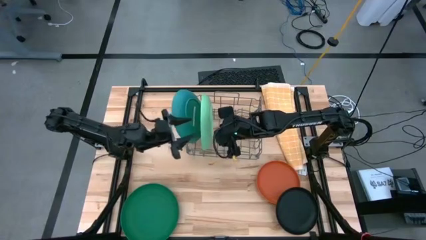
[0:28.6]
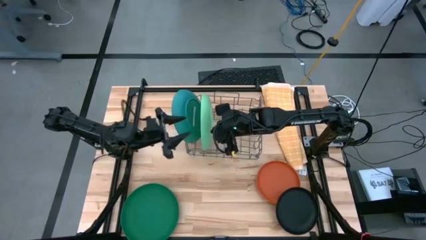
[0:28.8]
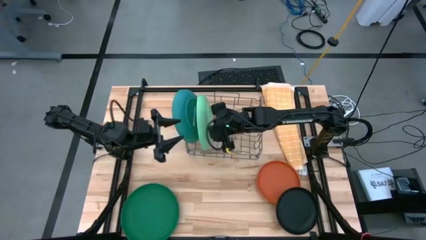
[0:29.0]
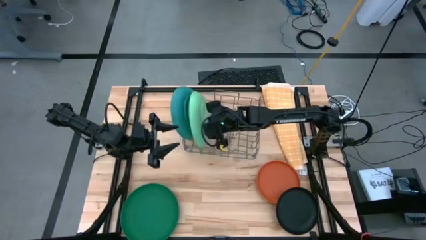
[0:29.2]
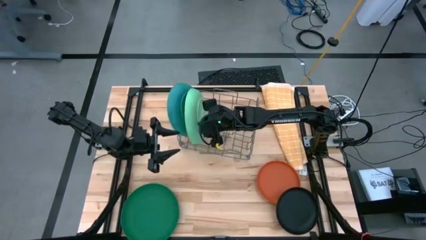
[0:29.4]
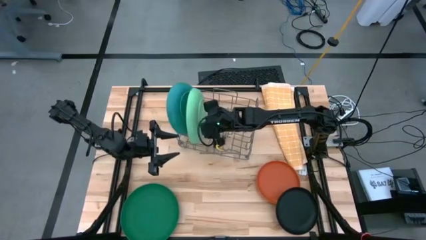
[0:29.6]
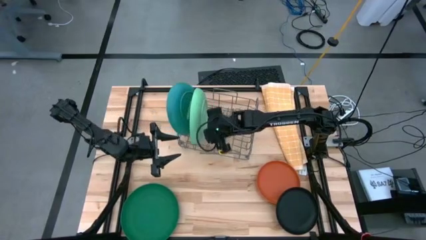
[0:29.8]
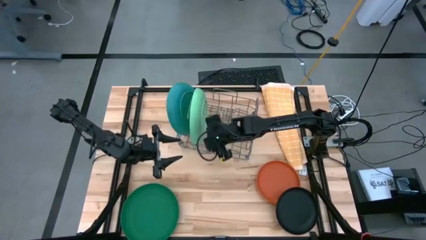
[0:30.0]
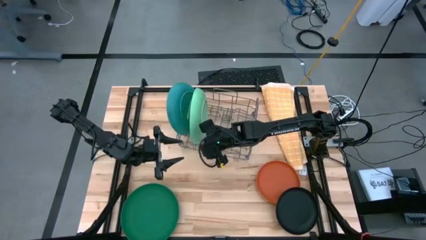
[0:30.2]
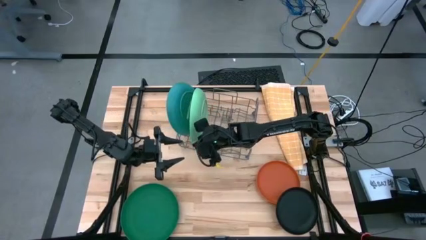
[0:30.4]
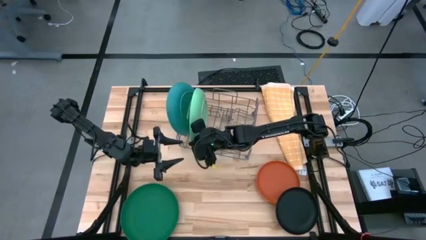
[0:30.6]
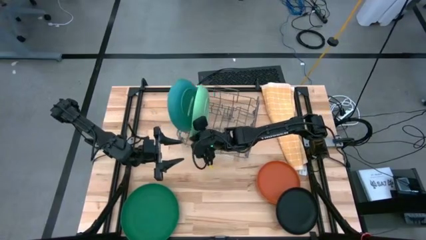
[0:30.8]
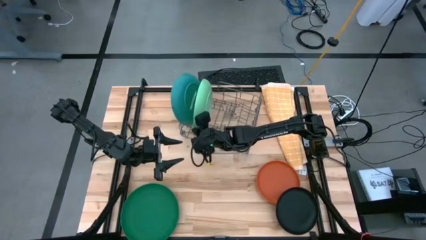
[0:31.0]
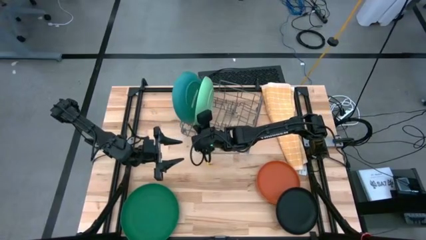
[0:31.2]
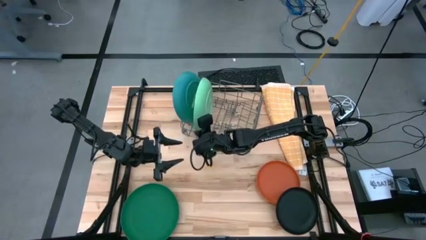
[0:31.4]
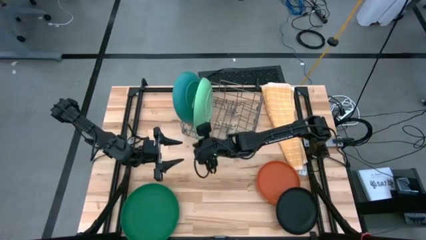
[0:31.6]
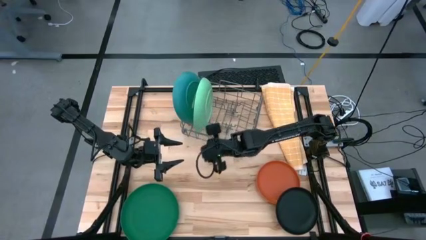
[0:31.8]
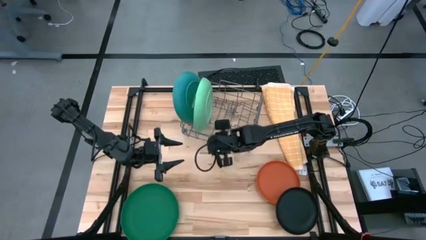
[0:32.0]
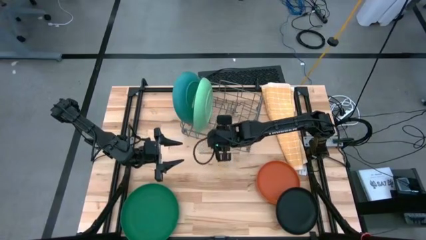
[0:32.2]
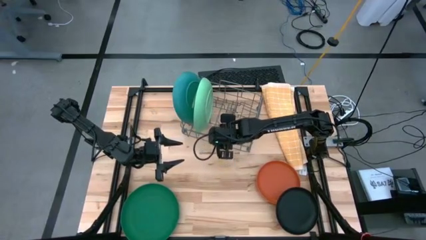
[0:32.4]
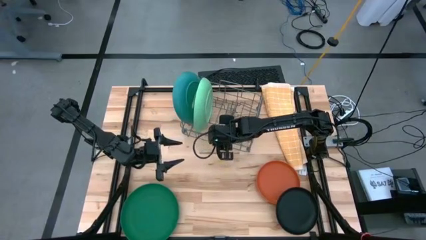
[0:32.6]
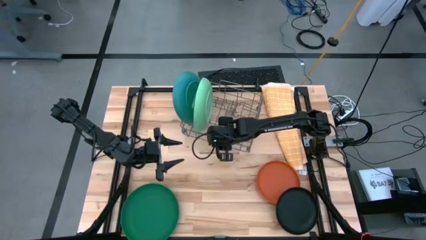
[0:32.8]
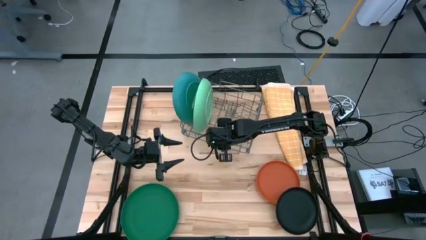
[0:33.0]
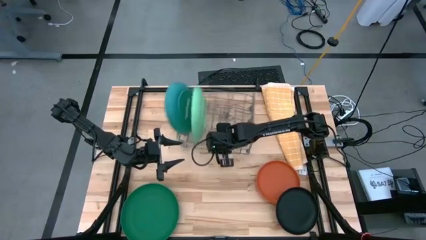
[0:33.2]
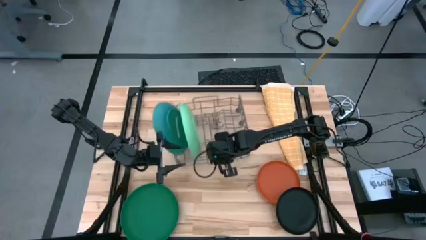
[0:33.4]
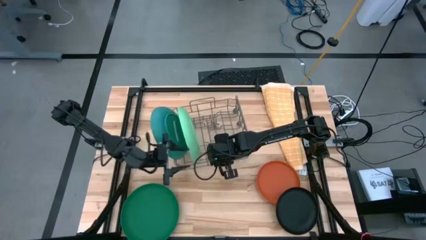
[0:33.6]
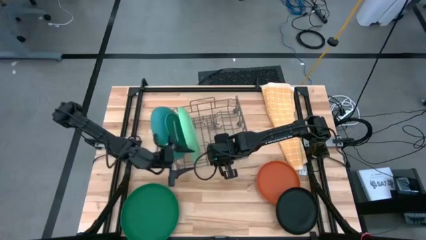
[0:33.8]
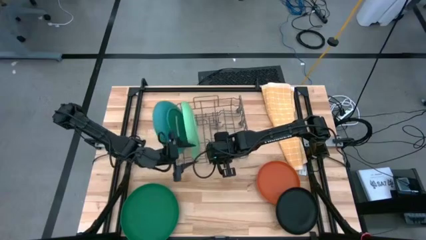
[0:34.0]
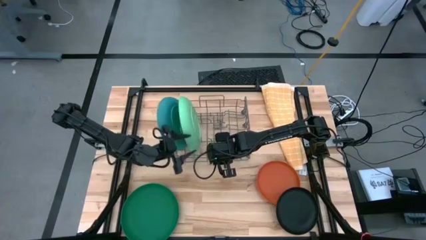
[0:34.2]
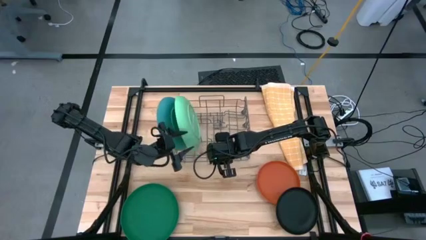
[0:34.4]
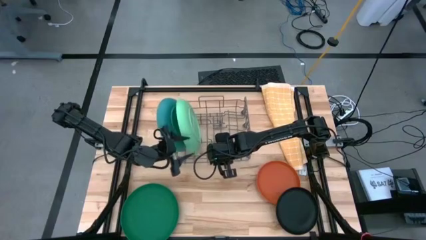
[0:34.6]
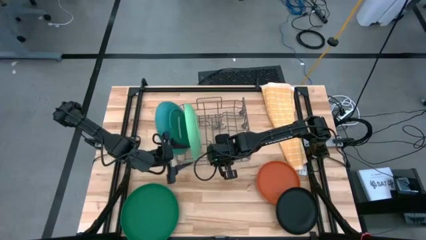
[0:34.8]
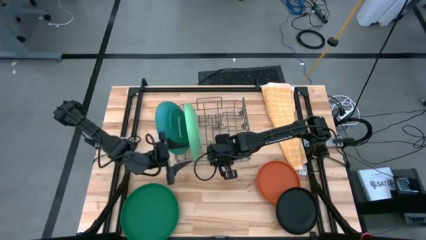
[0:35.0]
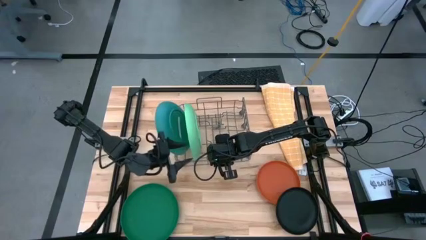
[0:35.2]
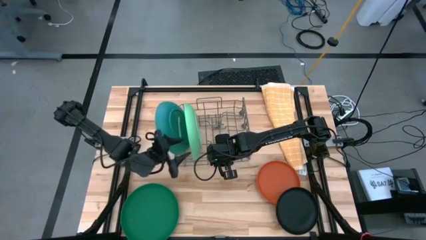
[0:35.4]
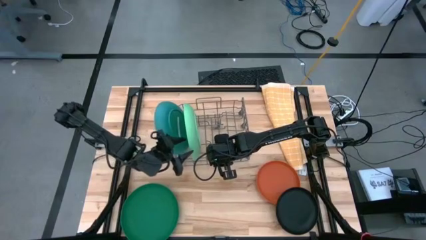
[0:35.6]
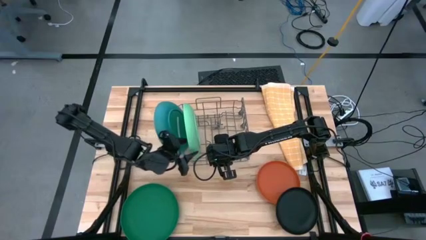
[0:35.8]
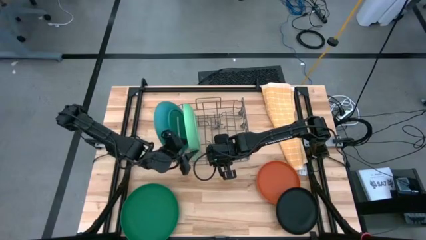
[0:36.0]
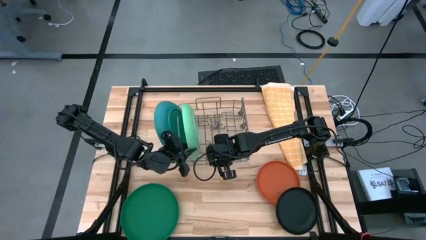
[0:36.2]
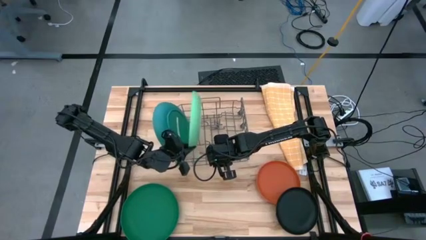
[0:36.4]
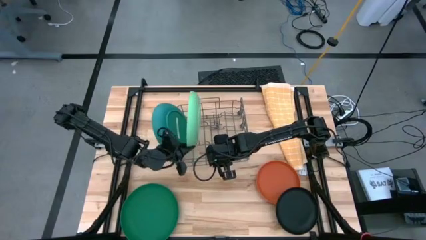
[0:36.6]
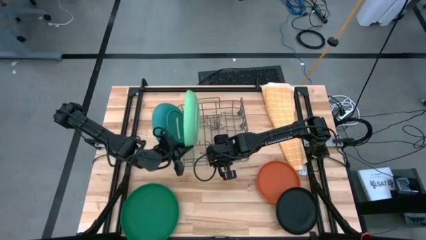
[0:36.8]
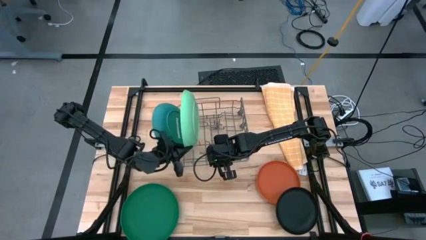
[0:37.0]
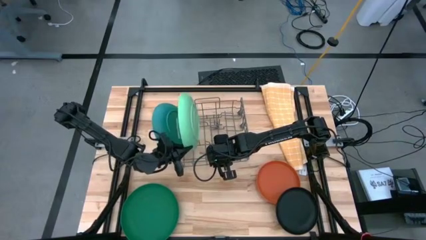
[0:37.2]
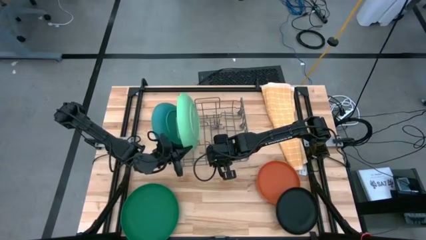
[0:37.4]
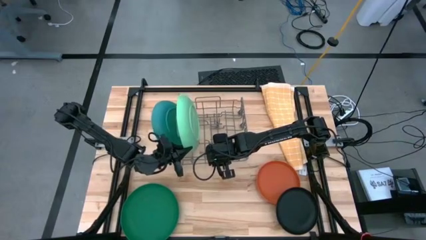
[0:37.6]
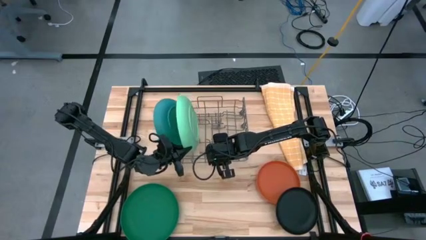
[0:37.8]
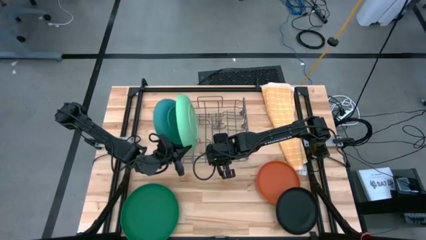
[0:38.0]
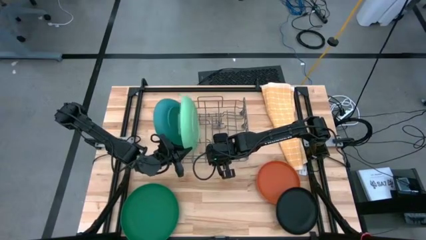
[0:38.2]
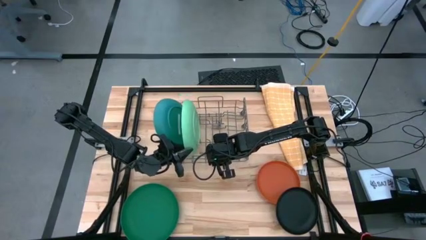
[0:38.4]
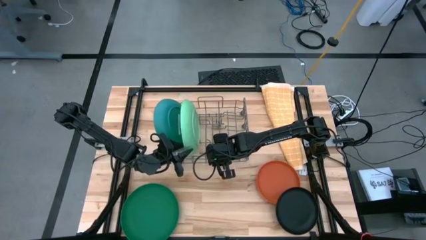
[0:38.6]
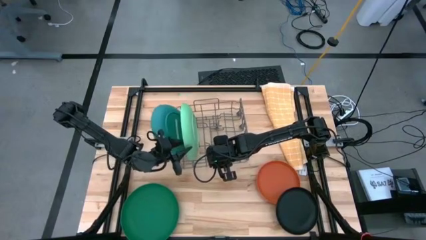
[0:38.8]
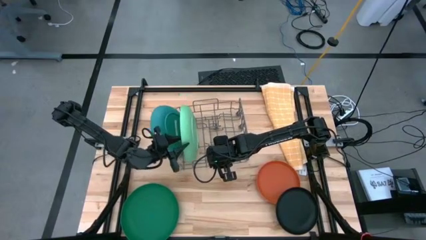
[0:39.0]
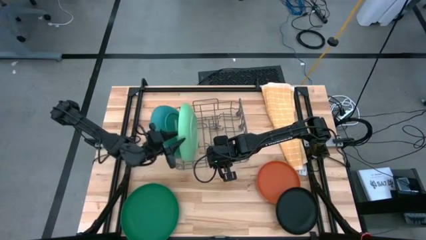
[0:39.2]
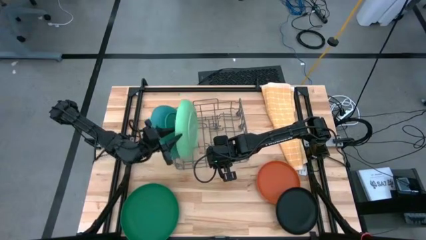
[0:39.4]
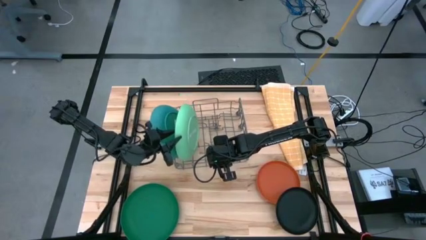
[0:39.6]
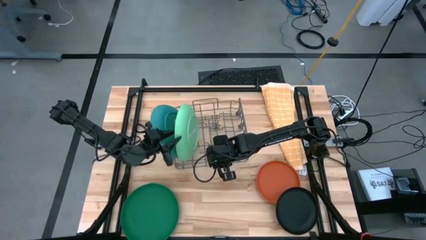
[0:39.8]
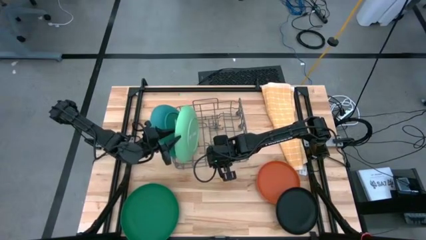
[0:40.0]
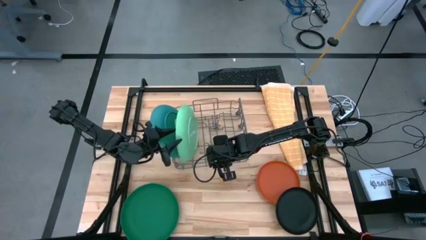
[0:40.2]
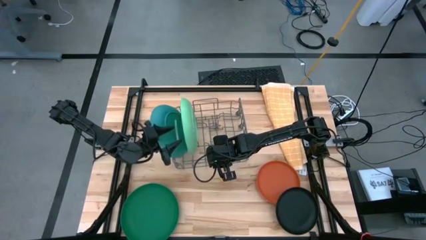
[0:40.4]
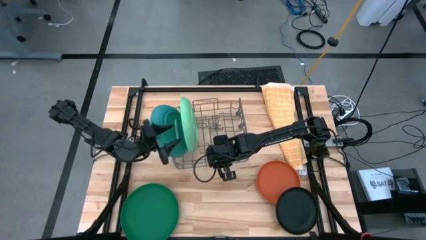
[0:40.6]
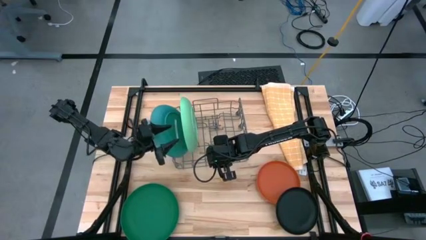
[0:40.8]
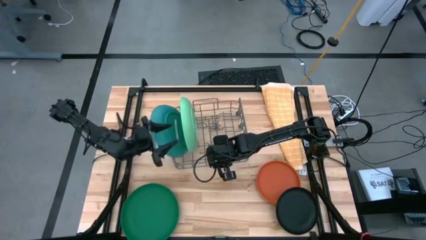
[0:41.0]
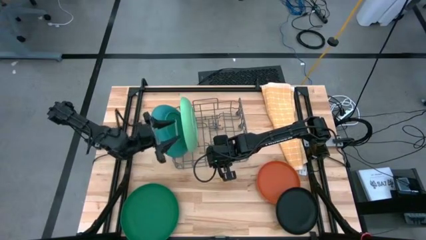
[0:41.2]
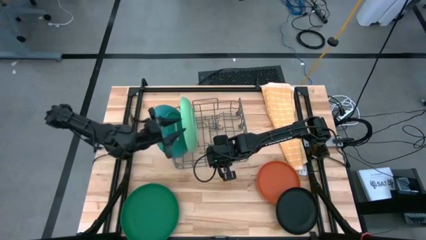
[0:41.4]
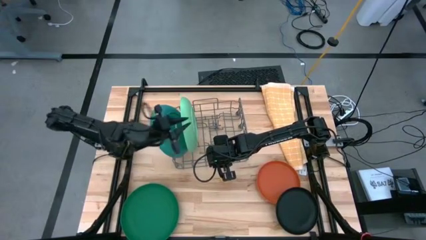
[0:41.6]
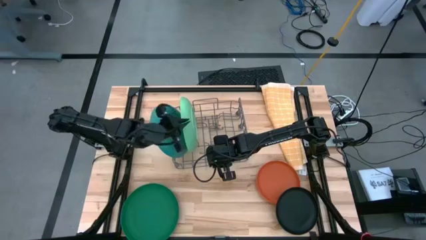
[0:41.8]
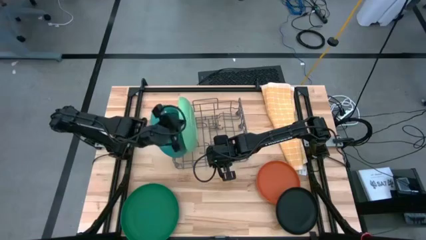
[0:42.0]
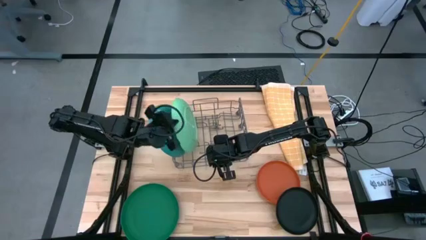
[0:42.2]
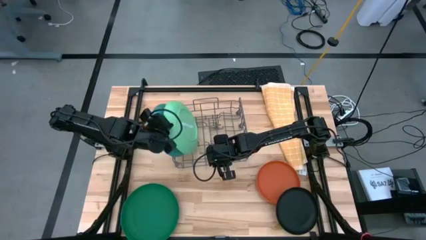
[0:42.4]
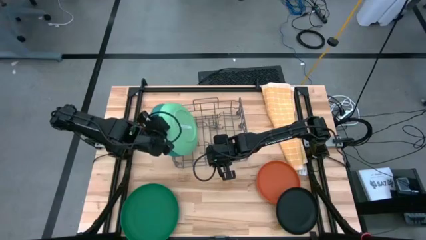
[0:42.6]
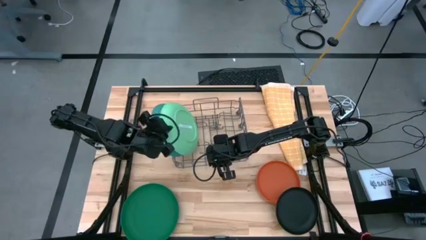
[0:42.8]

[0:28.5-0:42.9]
Task: Sort dishes
Adjust the light green plate

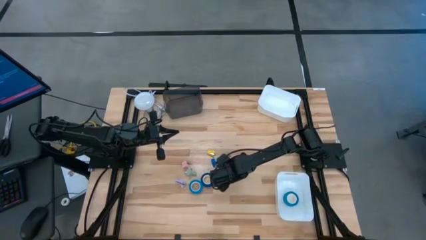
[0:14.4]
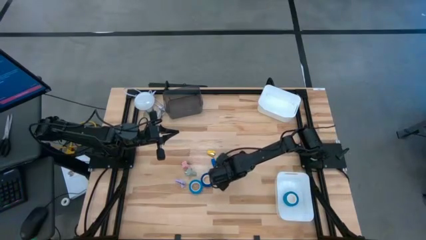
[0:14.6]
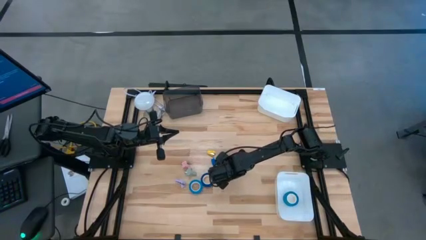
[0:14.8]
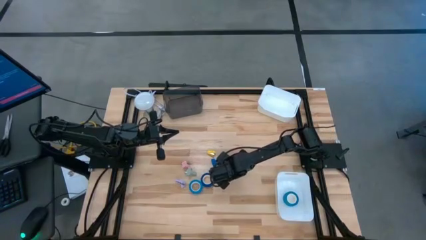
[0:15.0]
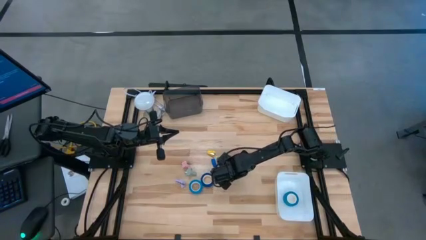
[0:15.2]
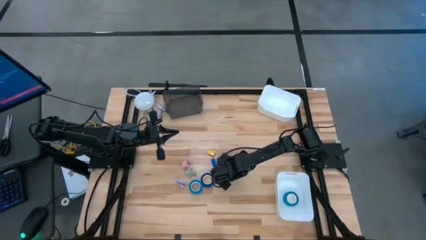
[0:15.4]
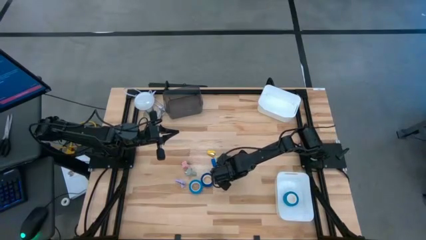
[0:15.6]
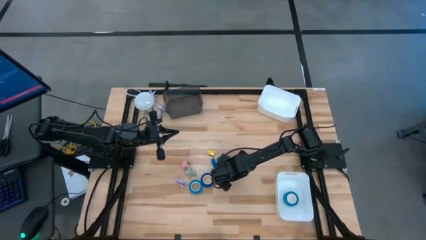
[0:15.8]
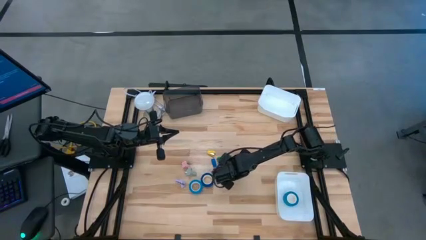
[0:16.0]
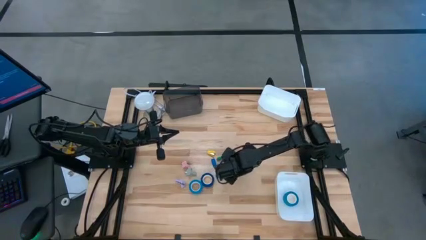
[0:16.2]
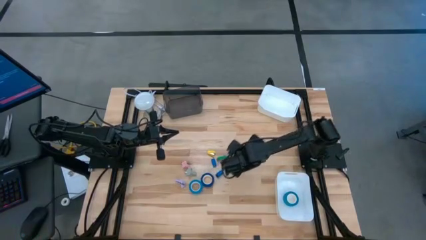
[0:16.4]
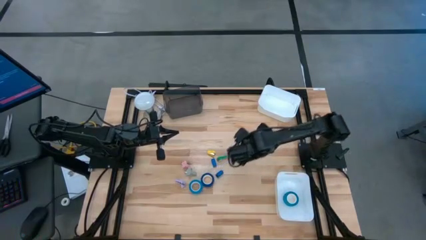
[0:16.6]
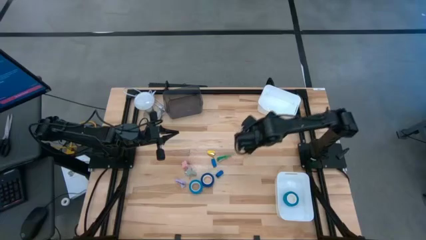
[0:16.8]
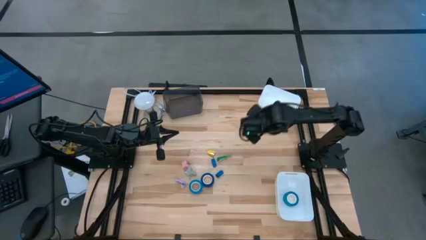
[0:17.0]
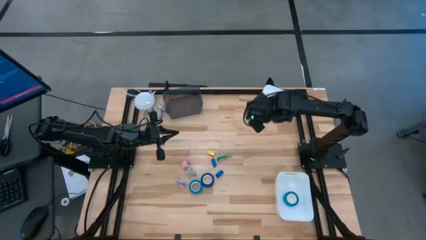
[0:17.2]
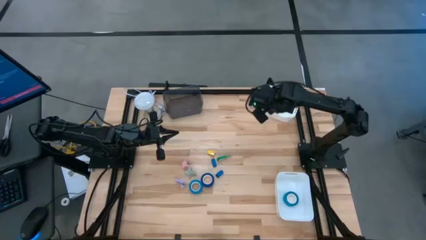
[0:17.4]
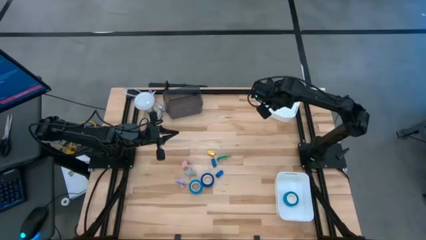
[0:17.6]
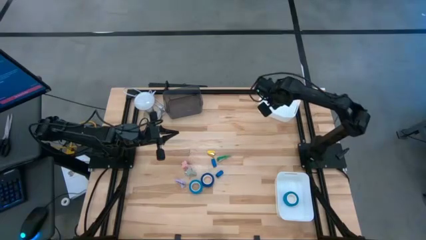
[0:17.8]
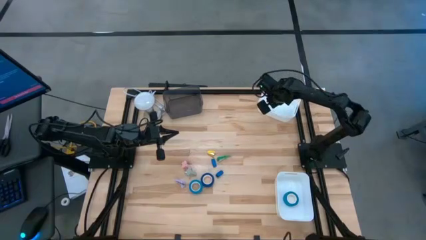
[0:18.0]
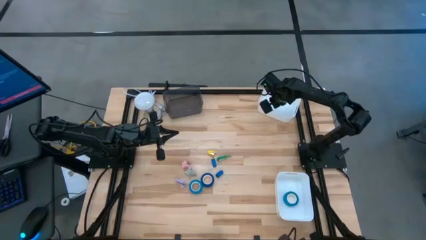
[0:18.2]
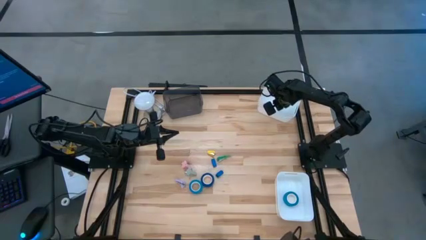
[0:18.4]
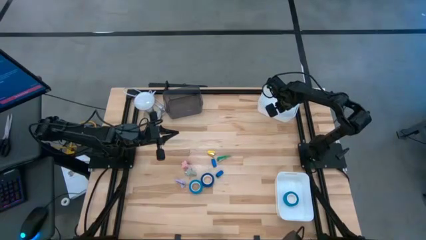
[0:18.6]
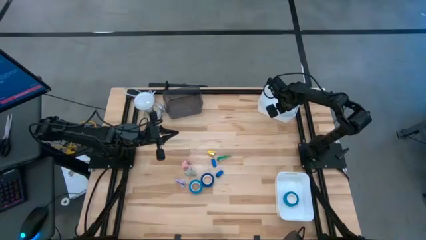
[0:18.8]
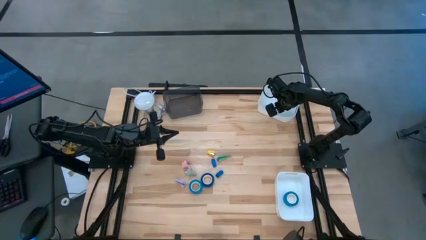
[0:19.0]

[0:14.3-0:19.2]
Task: Pick and place Stapler, Stapler remover, tape
Put the bottom green staple into the top right white bin
